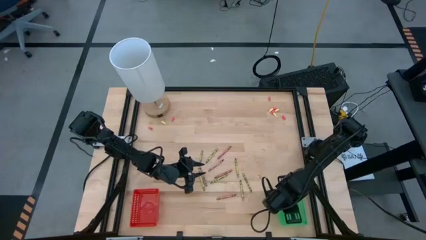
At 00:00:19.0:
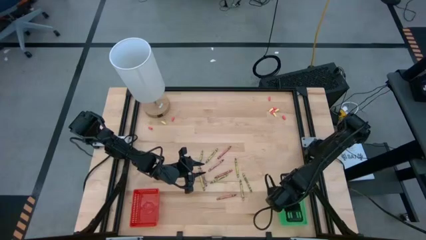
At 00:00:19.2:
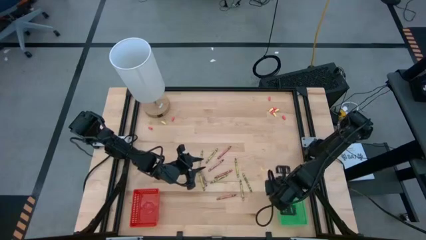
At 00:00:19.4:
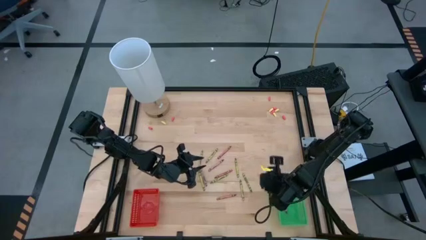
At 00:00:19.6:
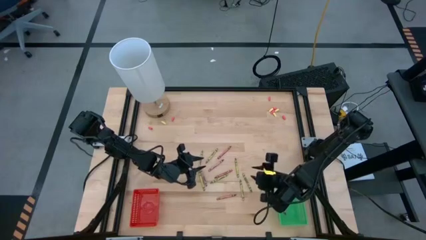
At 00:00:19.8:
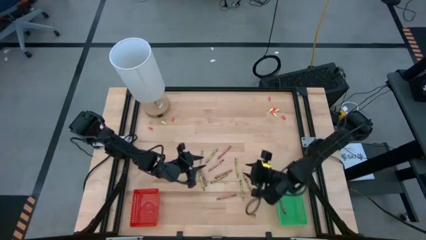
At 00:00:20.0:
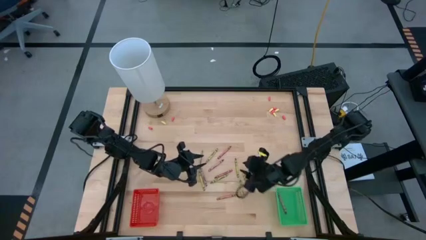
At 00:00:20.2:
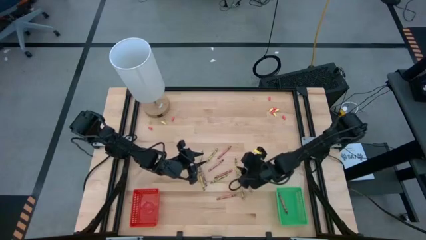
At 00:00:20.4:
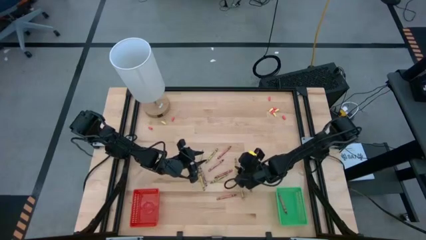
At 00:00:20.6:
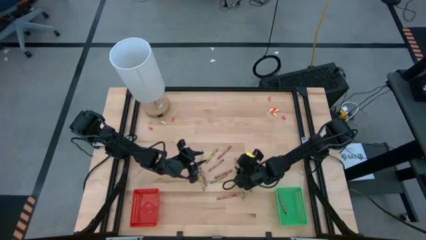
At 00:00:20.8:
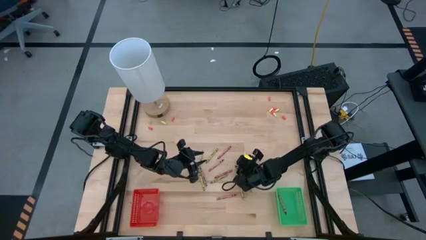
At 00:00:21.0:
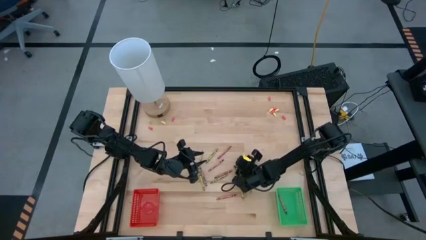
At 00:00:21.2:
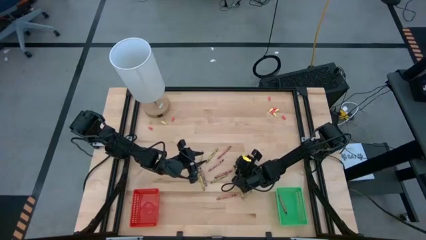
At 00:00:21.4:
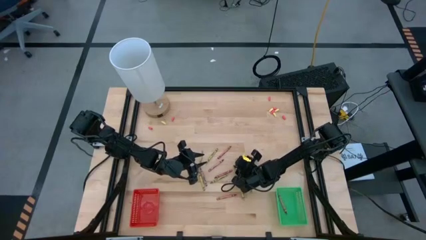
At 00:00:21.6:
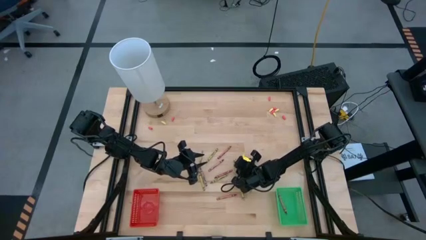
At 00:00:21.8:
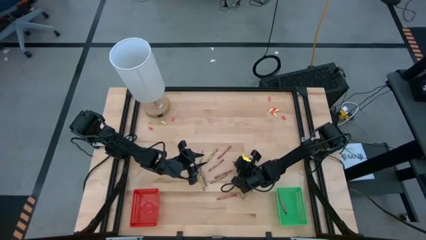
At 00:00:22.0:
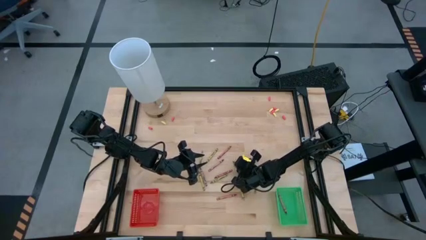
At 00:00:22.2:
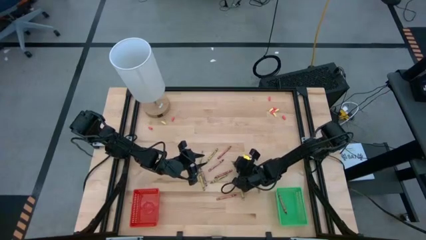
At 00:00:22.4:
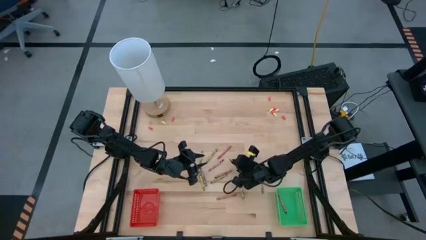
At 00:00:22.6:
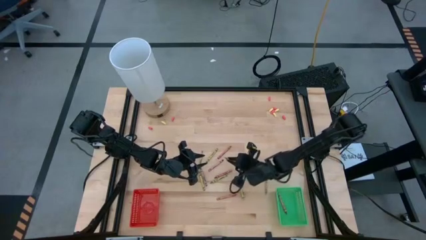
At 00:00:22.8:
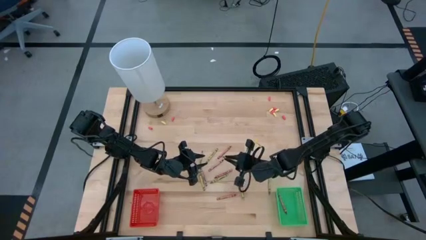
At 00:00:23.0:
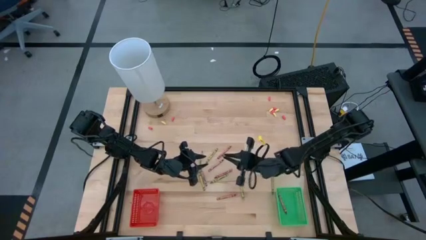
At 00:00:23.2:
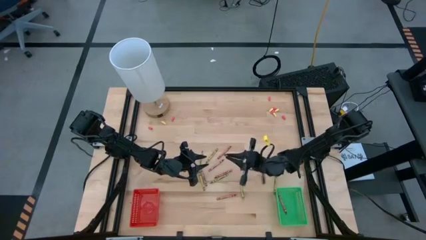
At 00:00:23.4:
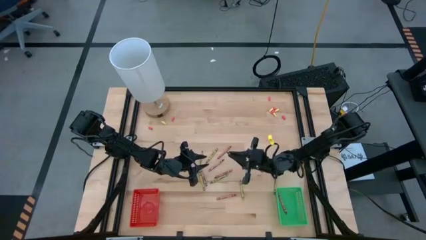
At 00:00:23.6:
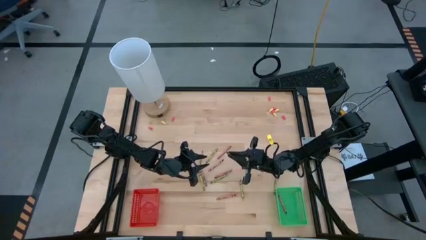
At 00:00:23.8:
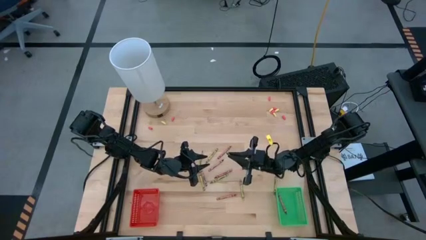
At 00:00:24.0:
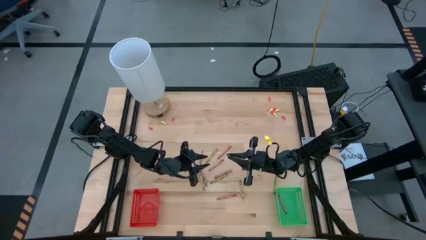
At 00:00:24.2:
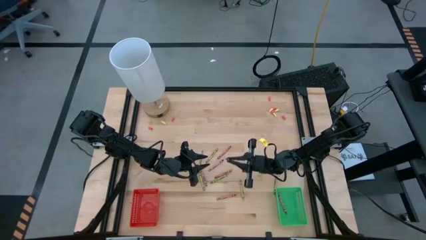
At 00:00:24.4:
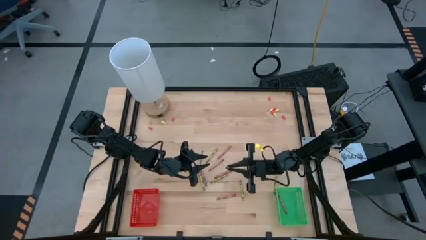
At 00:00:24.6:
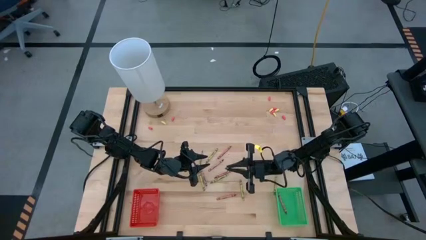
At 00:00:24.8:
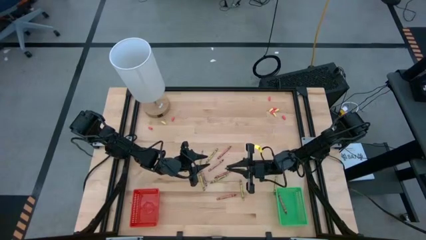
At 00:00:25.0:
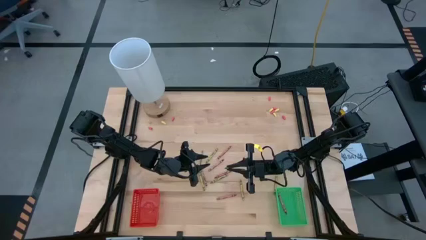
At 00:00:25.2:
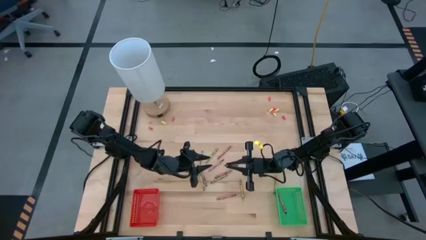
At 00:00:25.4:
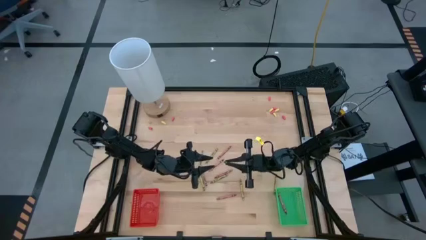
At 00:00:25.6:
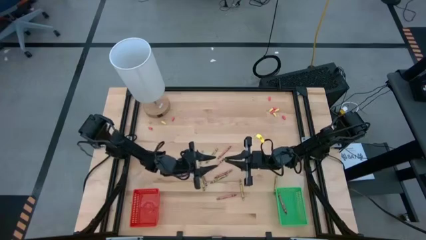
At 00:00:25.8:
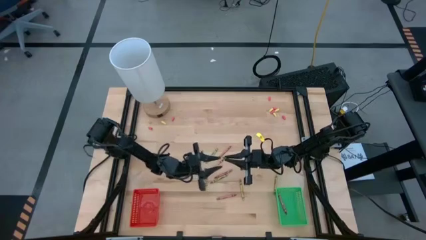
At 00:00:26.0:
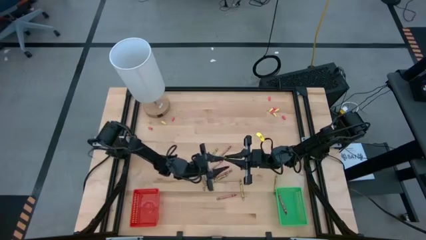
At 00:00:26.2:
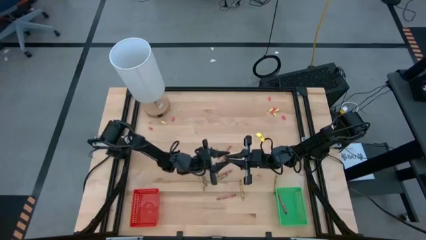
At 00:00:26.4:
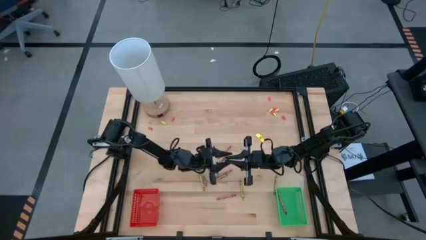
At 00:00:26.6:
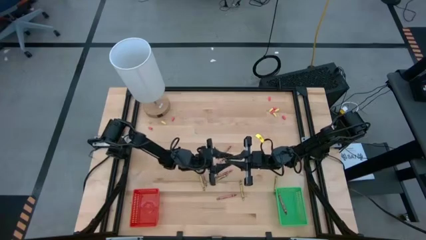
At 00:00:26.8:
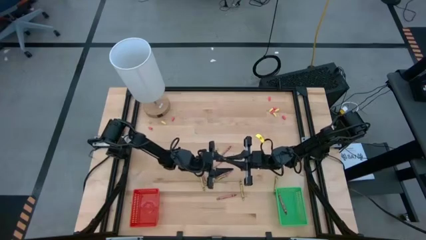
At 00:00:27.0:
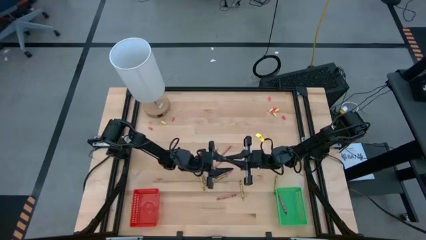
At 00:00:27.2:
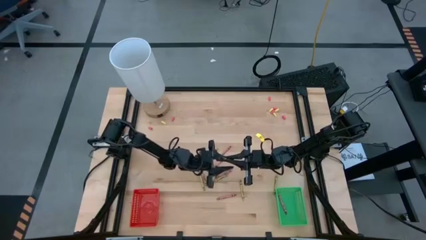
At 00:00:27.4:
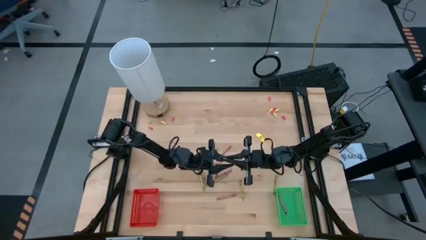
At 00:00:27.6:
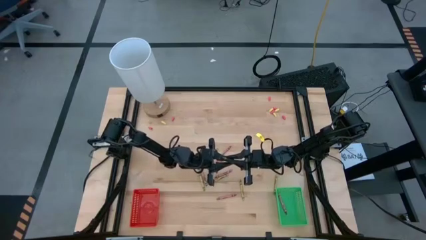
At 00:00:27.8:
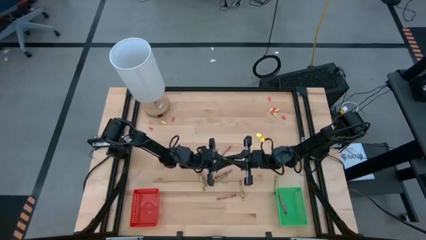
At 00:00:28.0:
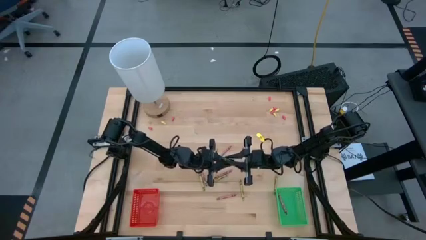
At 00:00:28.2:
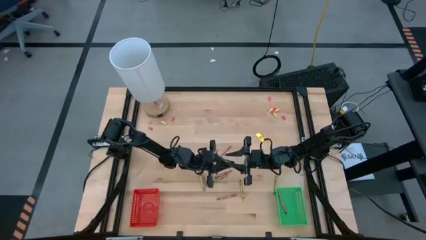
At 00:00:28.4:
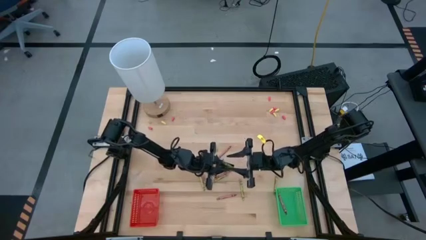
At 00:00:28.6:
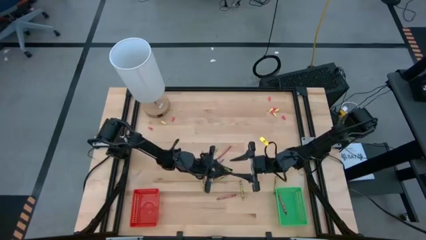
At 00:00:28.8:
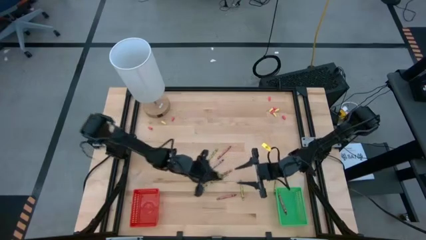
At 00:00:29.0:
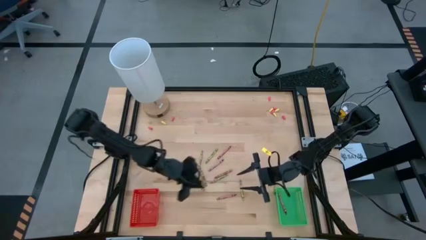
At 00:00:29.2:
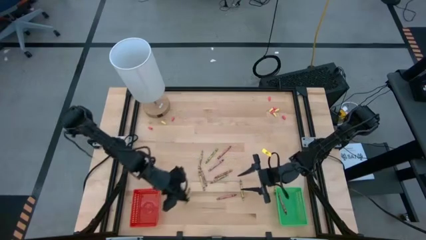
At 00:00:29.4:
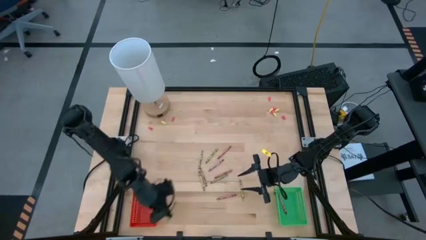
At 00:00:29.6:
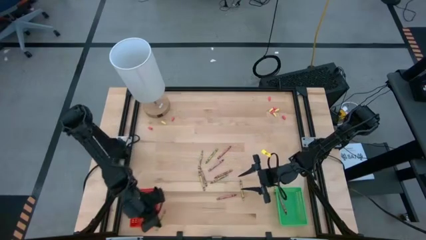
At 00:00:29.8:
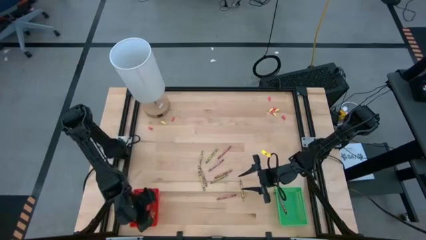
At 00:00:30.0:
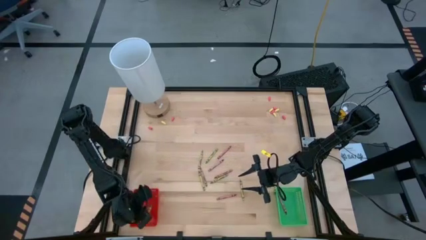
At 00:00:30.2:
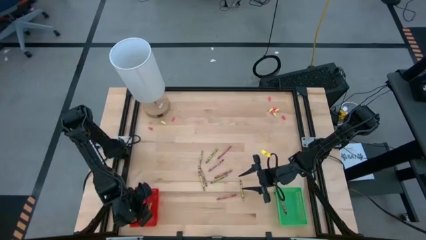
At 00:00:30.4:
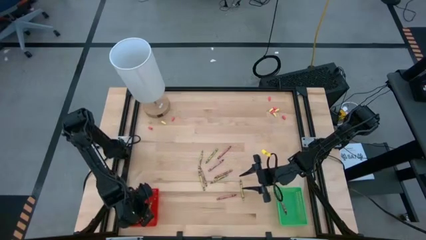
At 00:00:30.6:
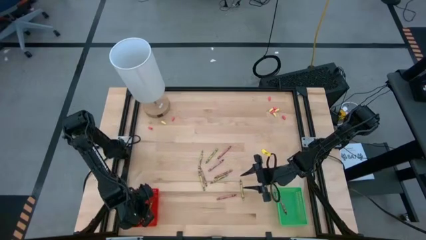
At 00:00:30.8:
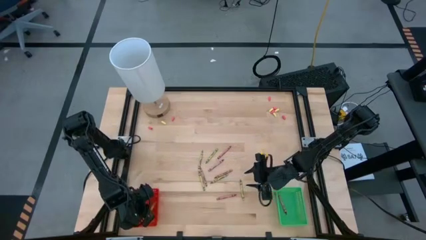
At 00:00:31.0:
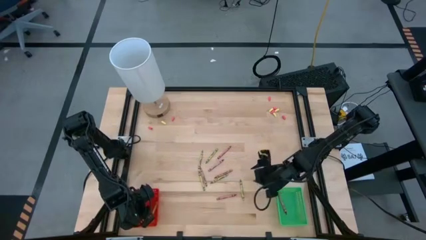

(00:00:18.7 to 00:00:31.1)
Task: Sort crayons
Put the green crayon into the red bin
